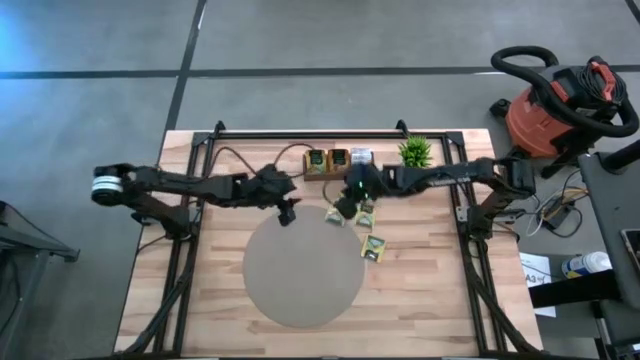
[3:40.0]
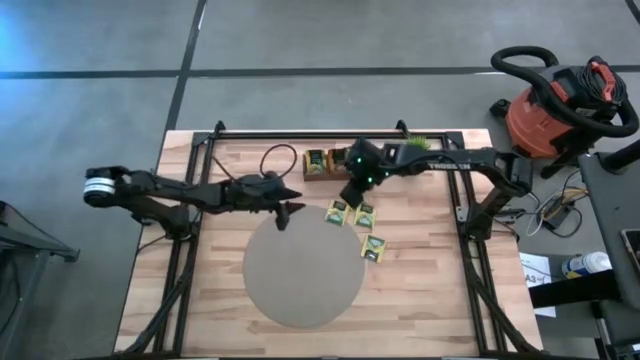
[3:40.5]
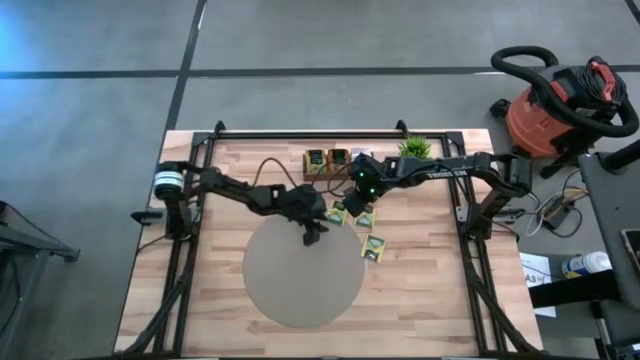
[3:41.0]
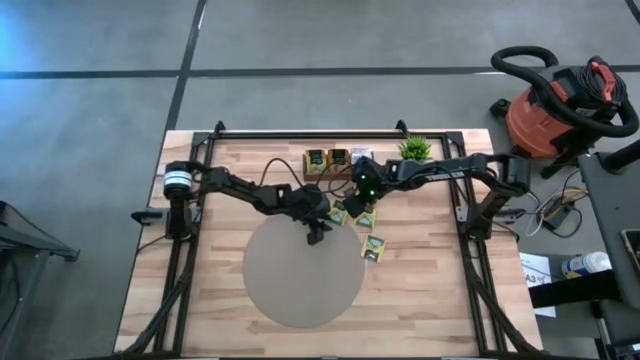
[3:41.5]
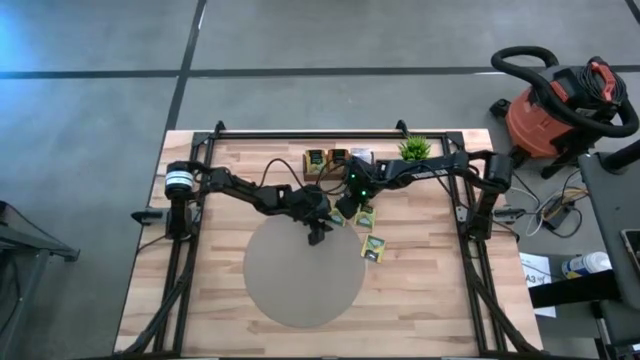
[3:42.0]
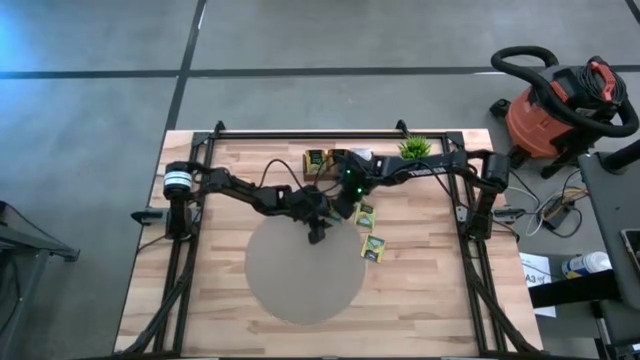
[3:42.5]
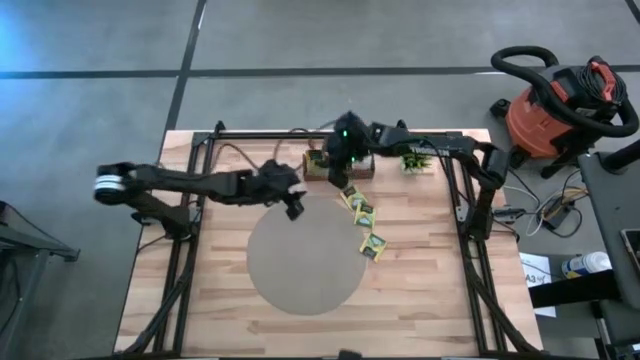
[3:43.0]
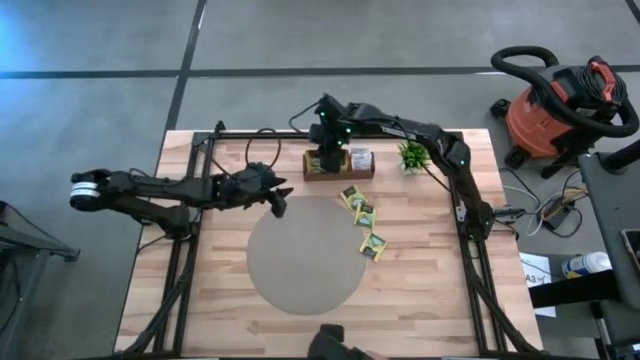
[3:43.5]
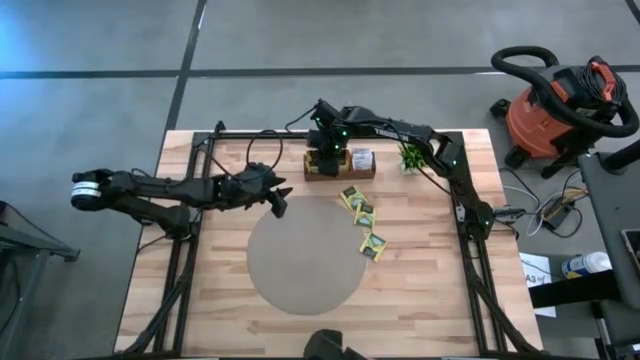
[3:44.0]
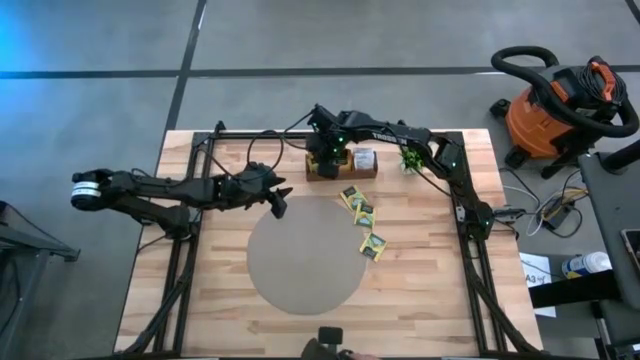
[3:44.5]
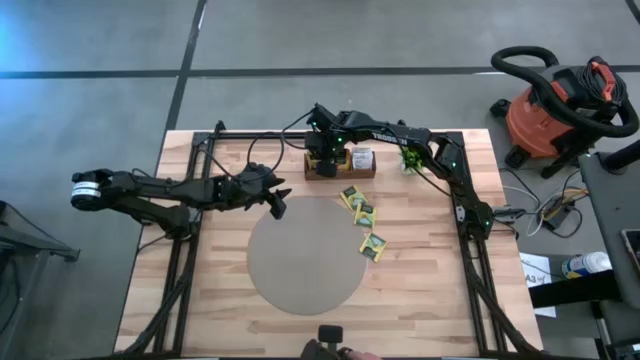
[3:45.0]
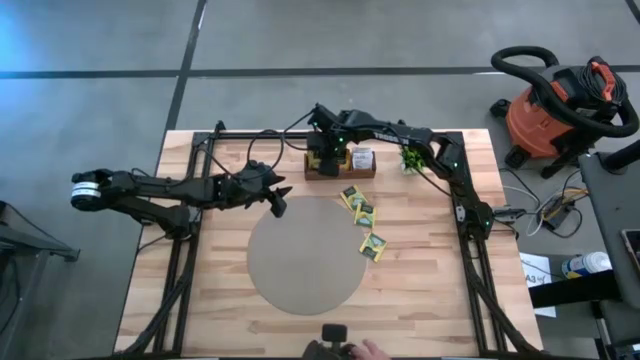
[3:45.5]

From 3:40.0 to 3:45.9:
Task: Pick & Place Tea
Put the yellow tea sachet into the left compartment of the wooden organizer

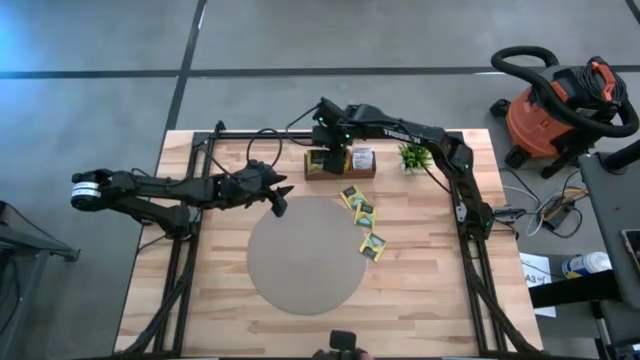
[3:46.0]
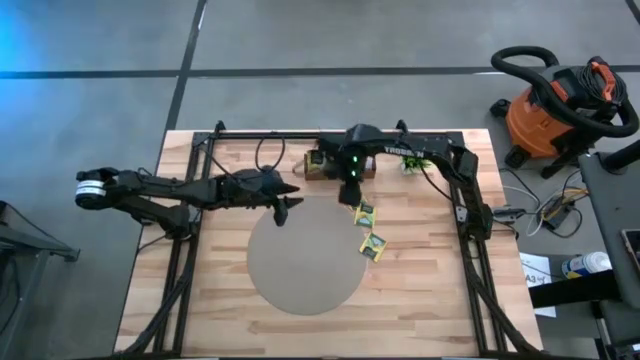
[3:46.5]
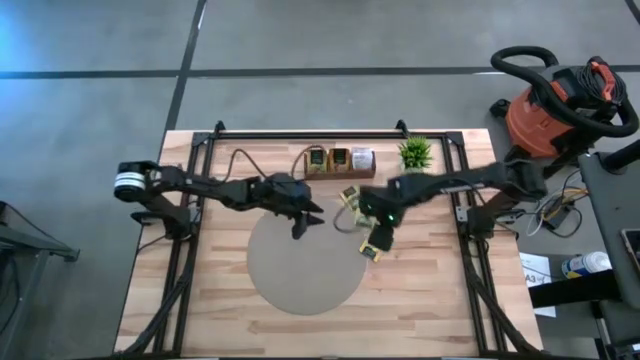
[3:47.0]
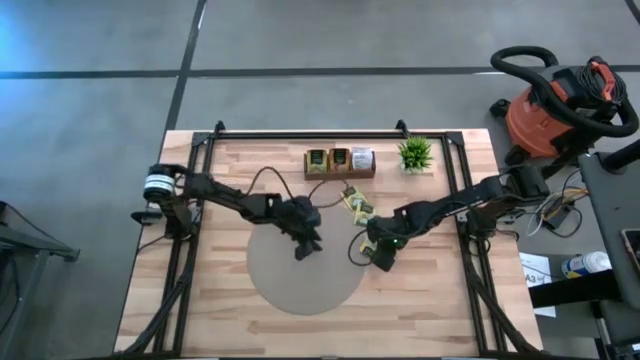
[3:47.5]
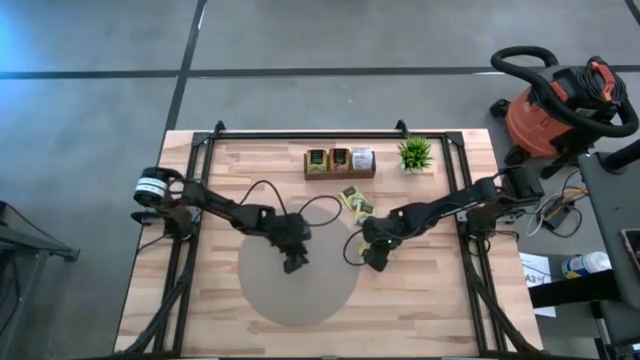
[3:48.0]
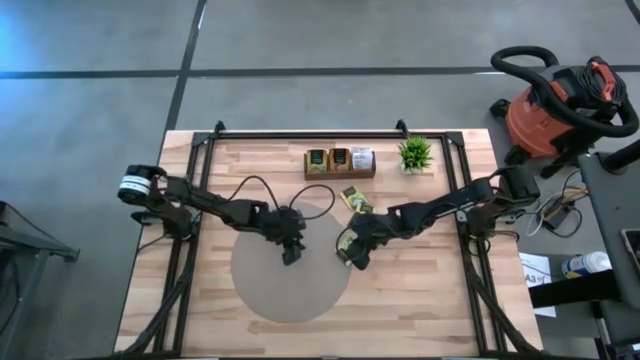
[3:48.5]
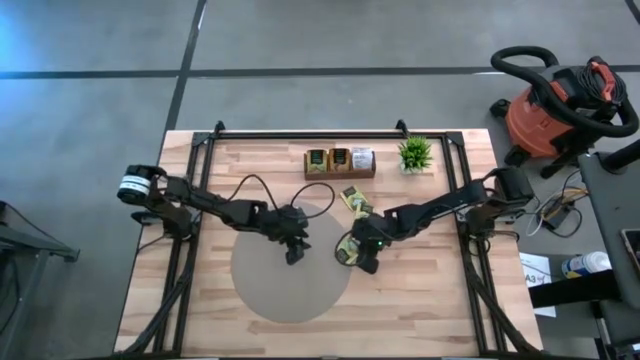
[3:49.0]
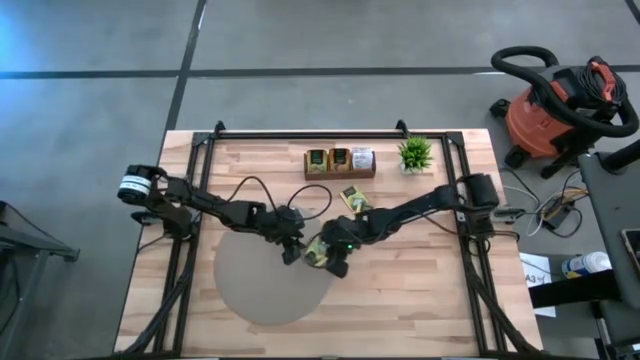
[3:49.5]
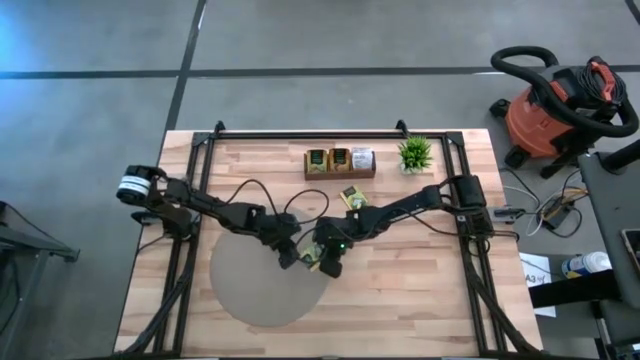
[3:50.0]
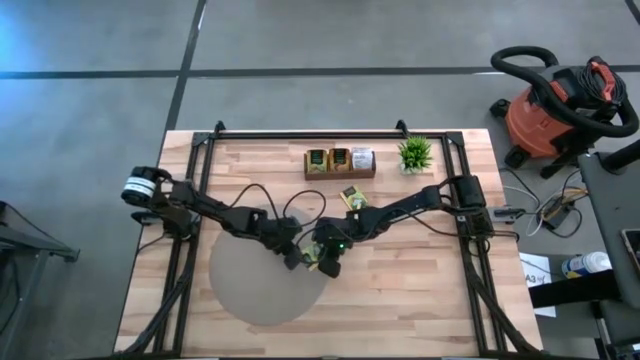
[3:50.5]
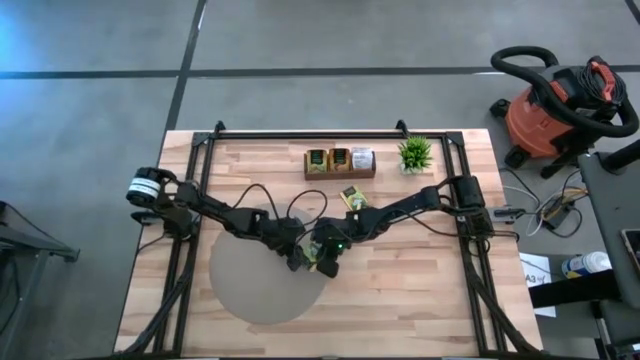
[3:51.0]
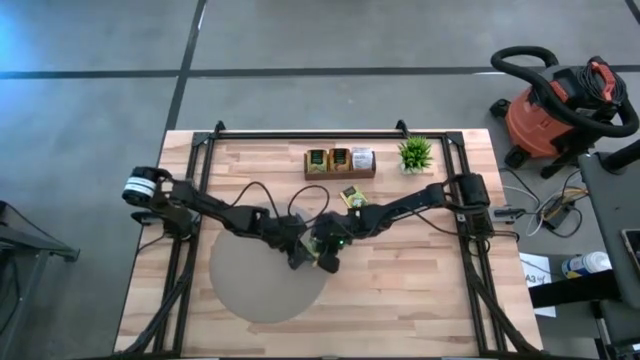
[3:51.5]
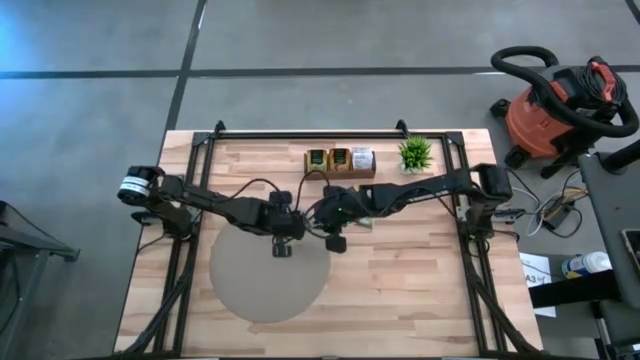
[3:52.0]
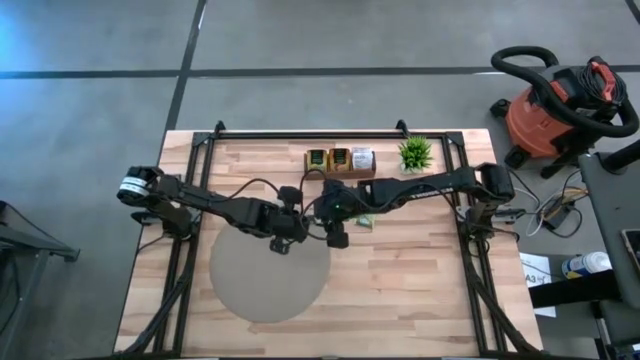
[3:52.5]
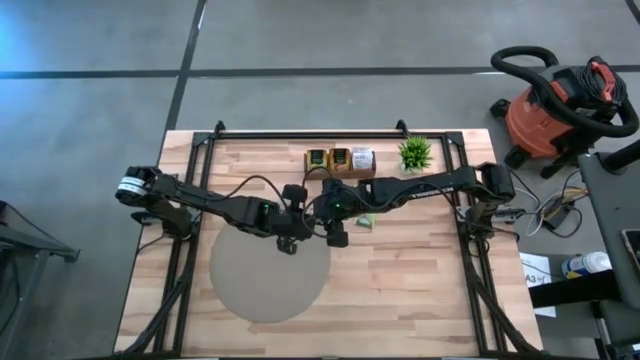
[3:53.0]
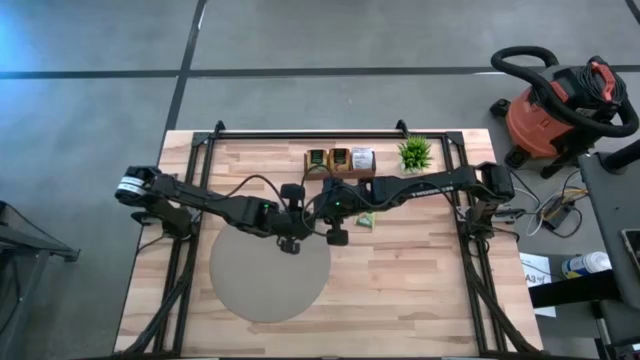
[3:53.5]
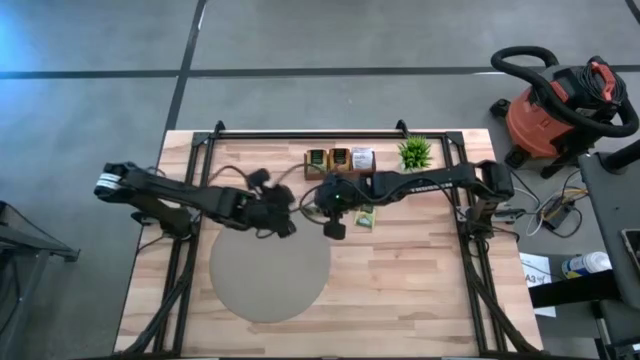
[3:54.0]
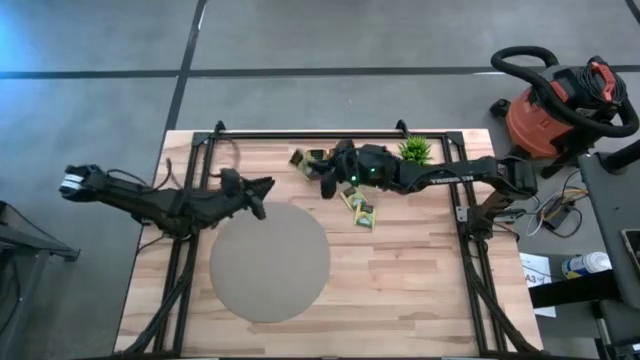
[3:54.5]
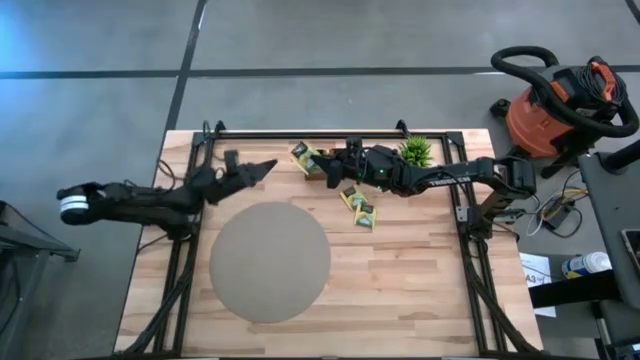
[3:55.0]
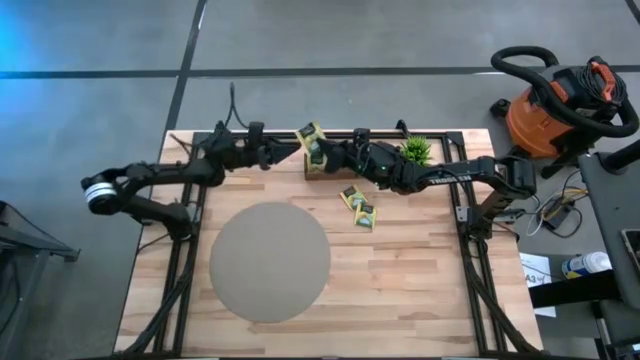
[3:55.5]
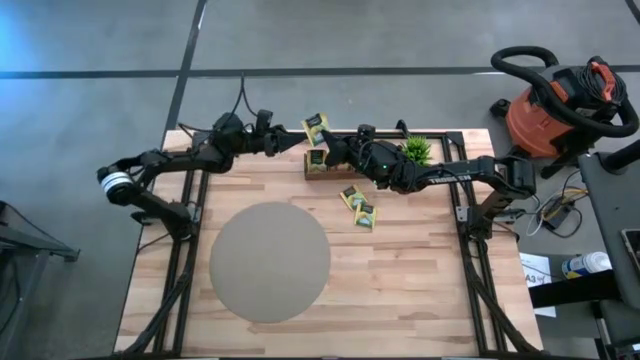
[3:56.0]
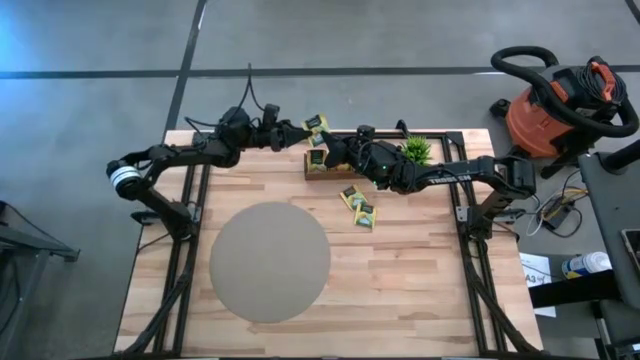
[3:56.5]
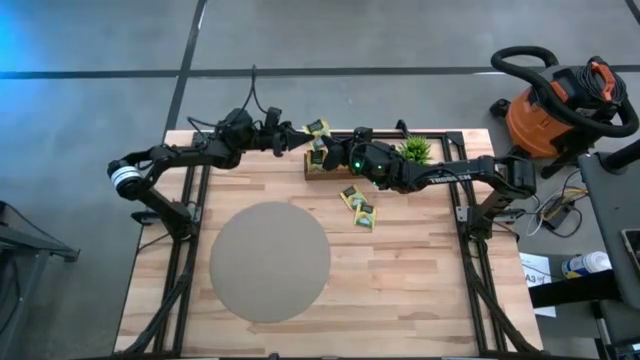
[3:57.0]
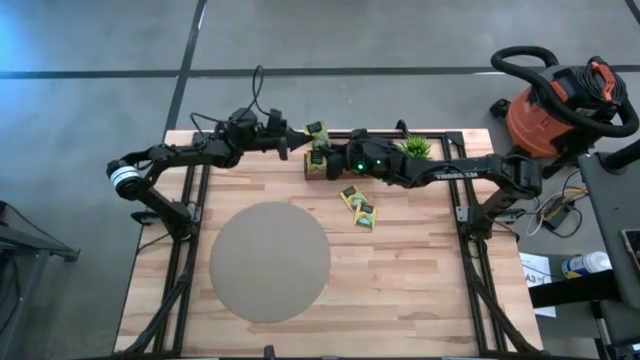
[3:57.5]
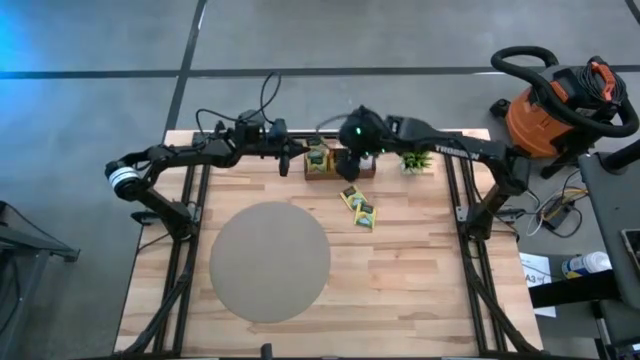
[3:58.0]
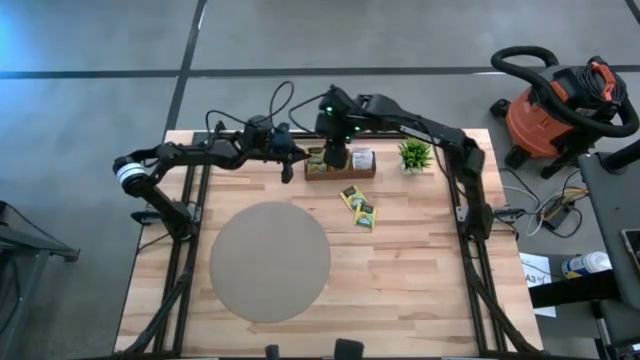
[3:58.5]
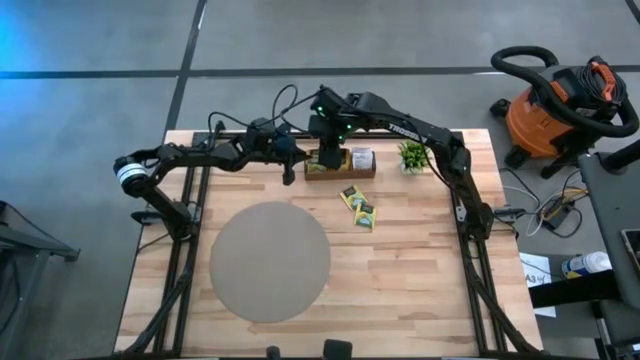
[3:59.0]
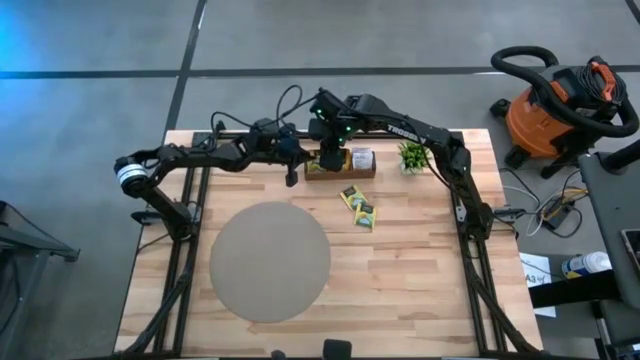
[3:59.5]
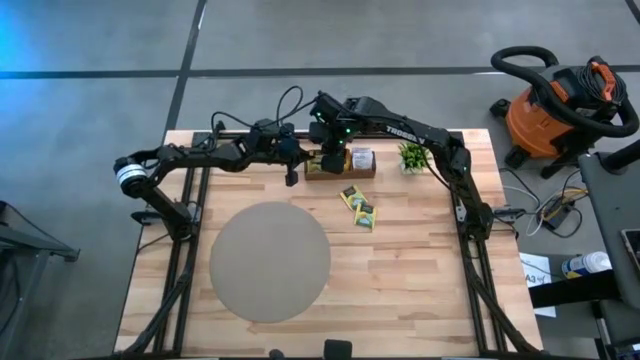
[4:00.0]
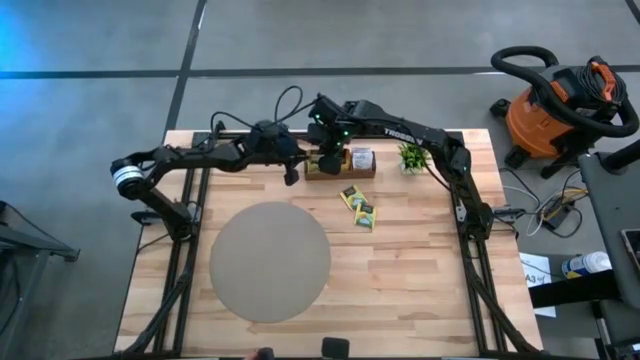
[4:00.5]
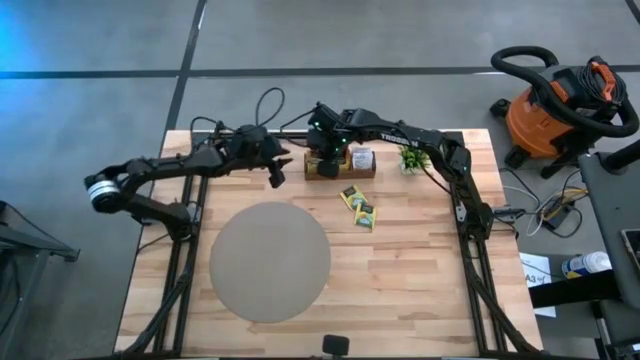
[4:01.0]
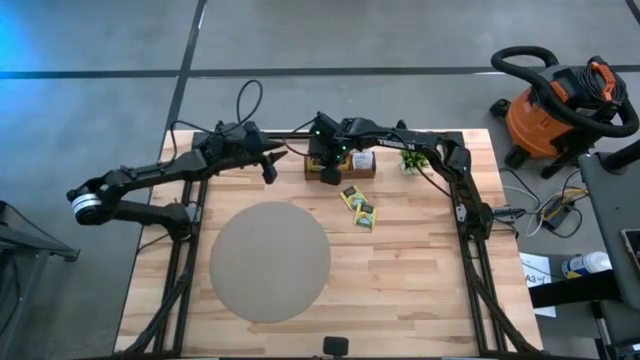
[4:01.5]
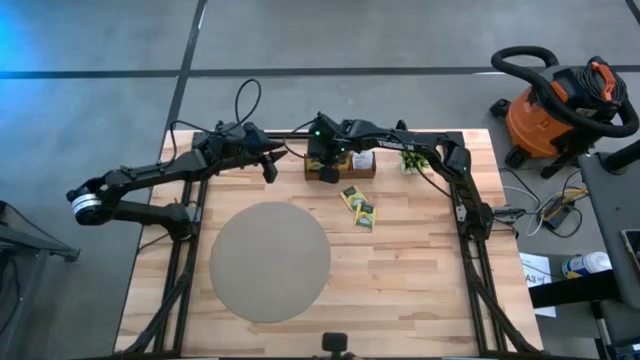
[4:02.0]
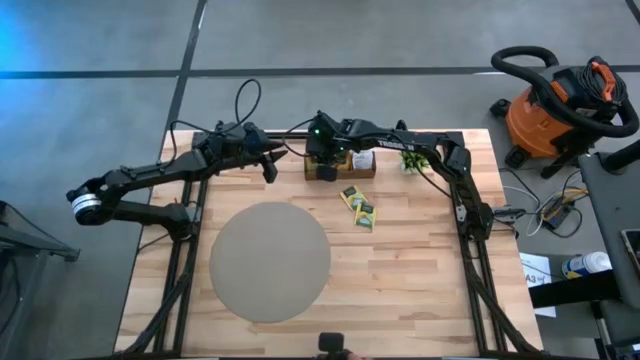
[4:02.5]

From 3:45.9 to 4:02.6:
Put the yellow tea sachet into the left compartment of the wooden organizer
